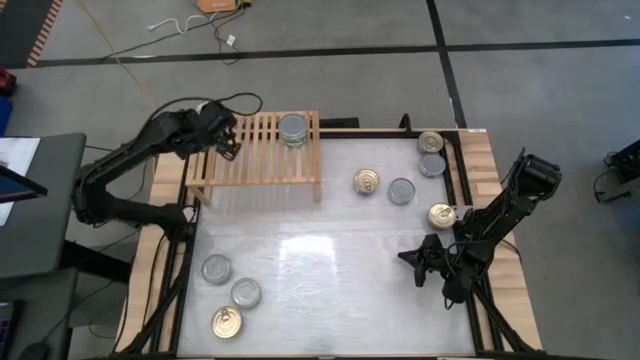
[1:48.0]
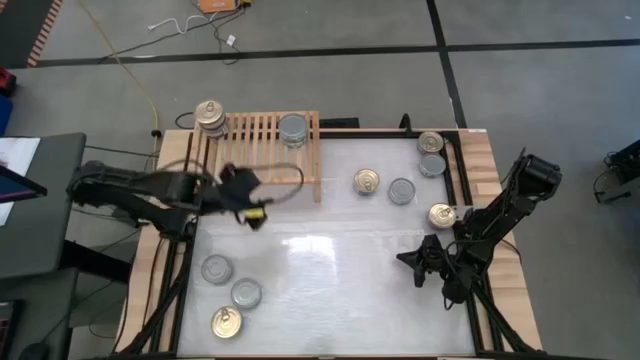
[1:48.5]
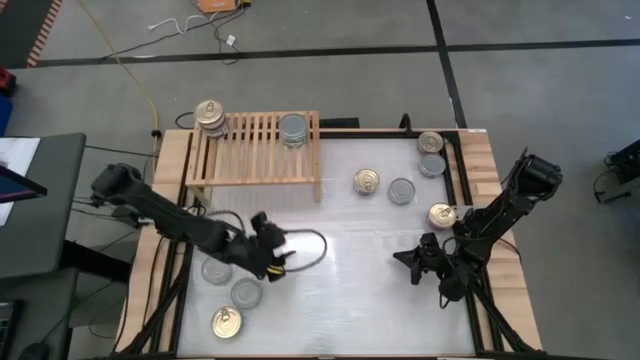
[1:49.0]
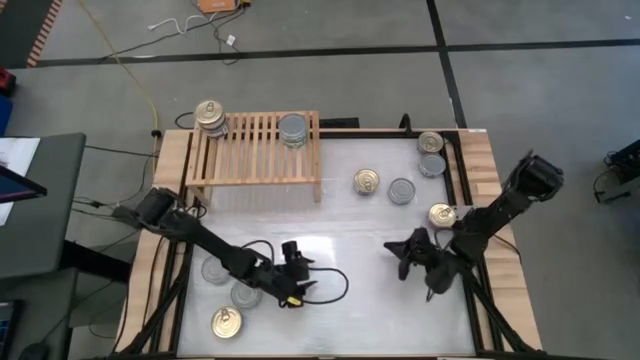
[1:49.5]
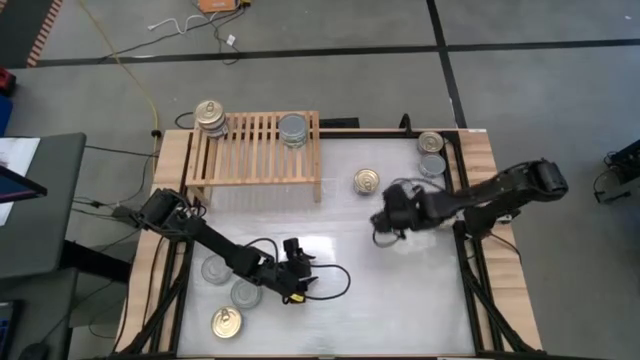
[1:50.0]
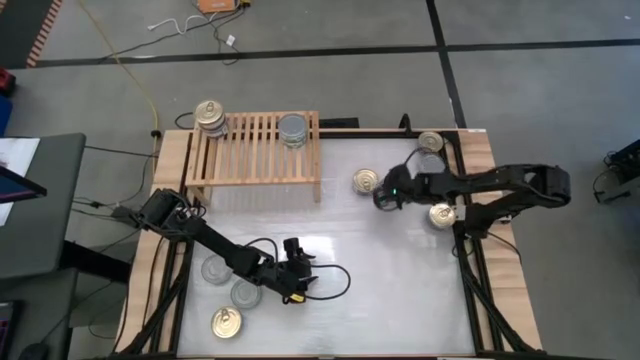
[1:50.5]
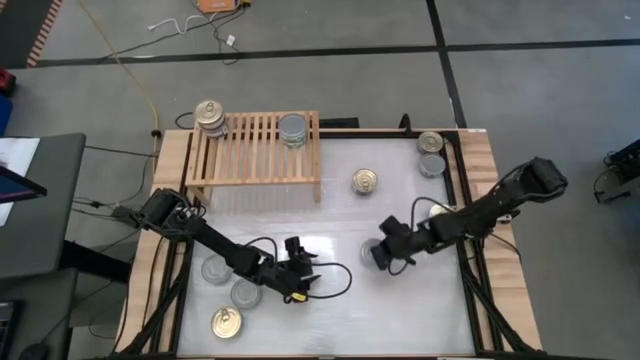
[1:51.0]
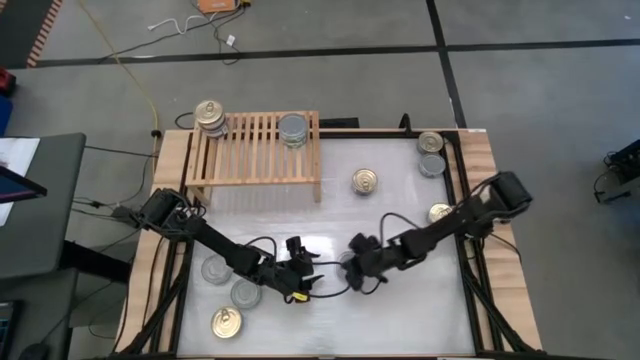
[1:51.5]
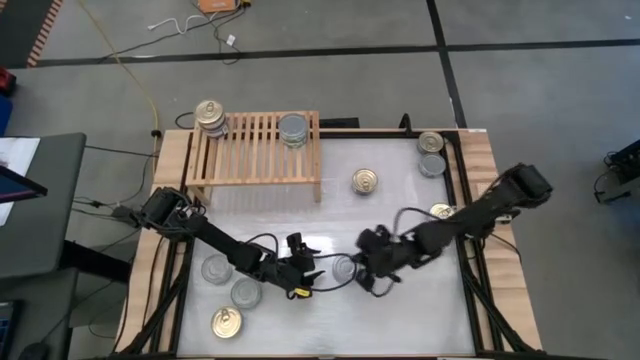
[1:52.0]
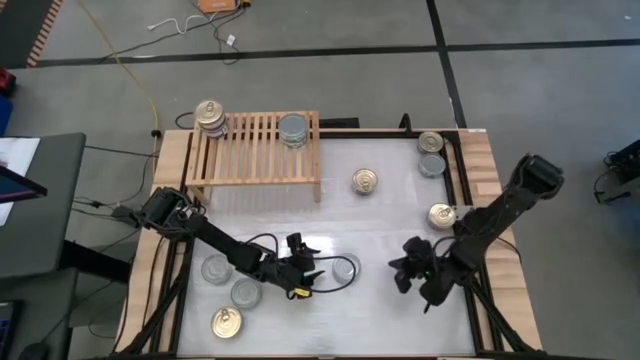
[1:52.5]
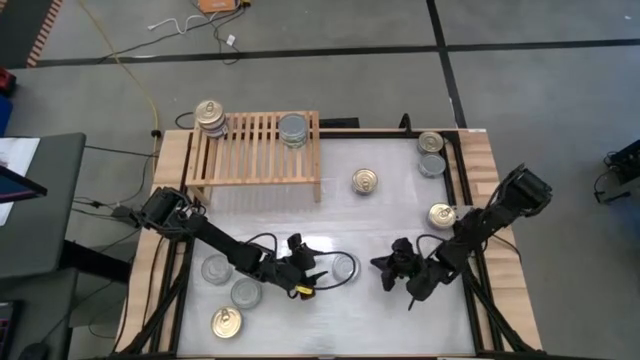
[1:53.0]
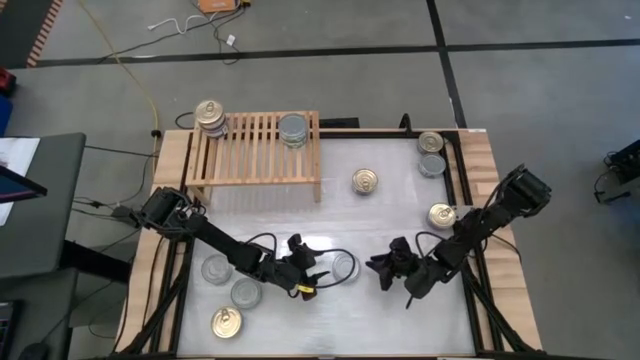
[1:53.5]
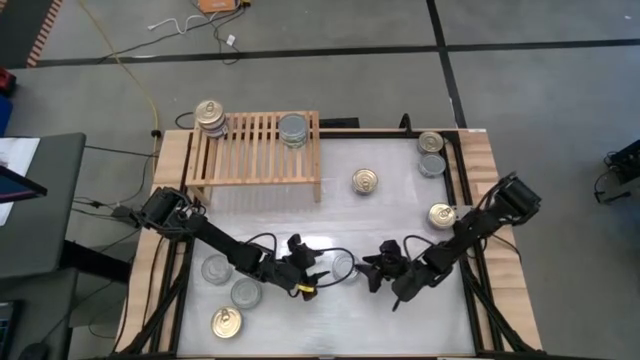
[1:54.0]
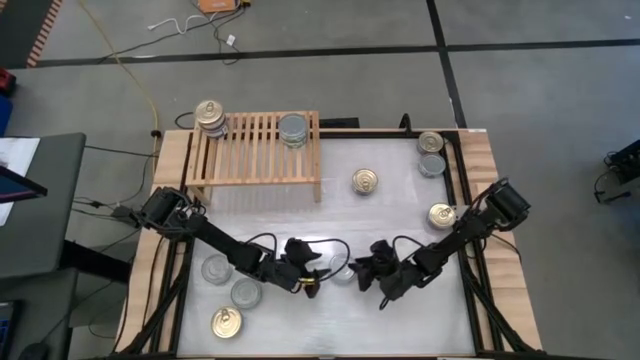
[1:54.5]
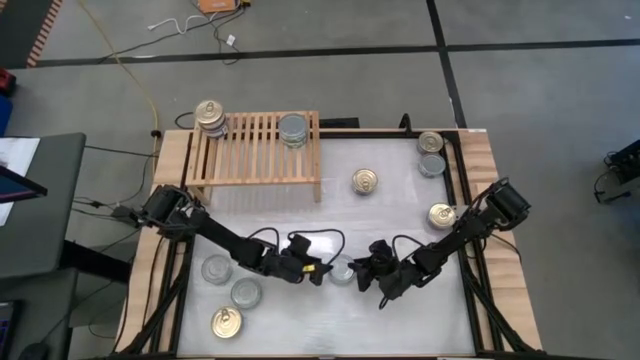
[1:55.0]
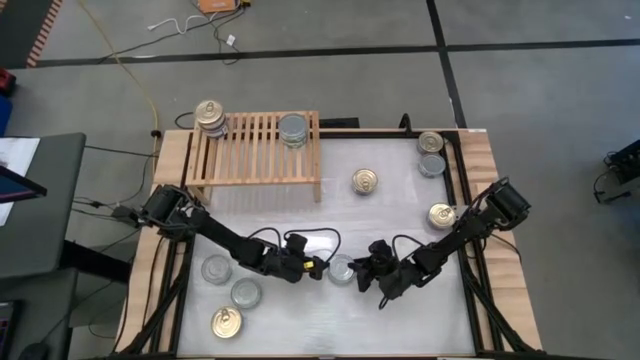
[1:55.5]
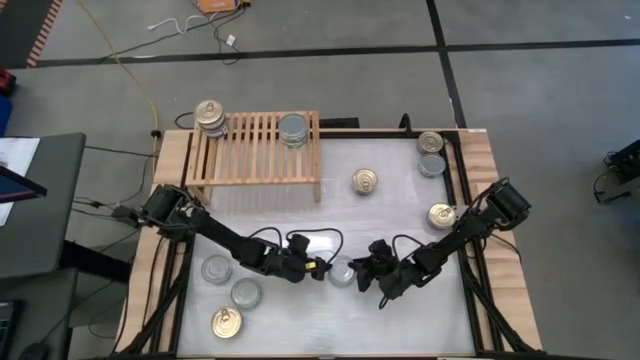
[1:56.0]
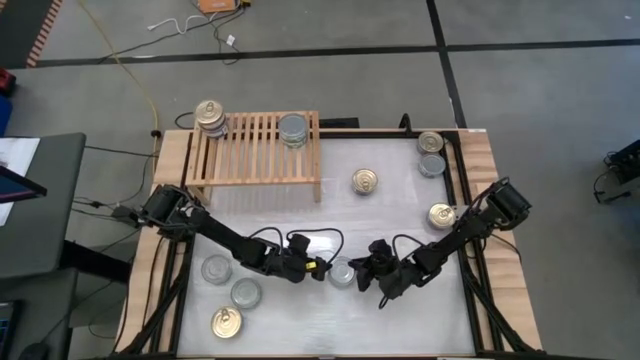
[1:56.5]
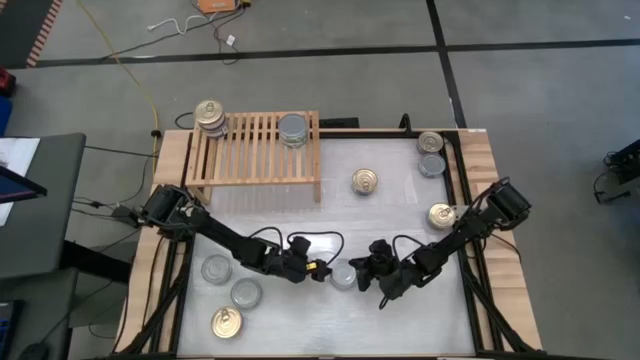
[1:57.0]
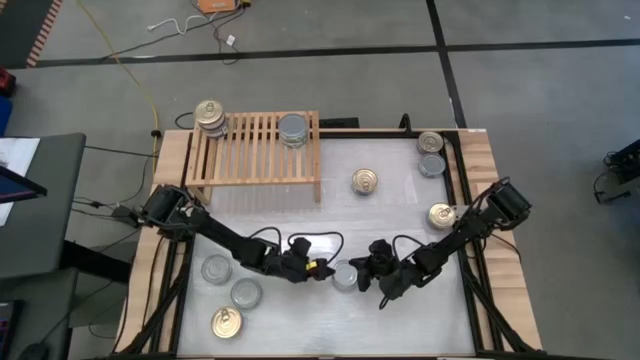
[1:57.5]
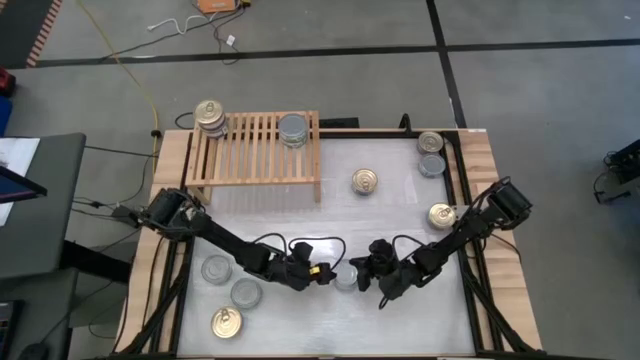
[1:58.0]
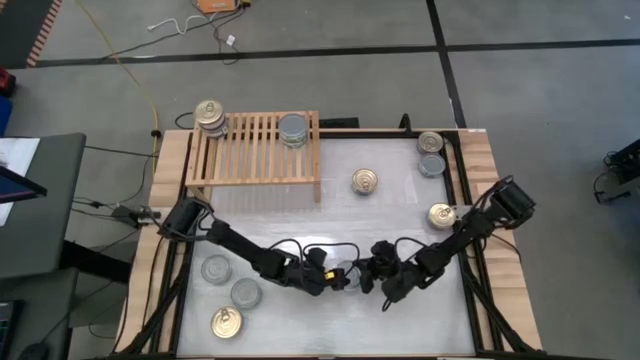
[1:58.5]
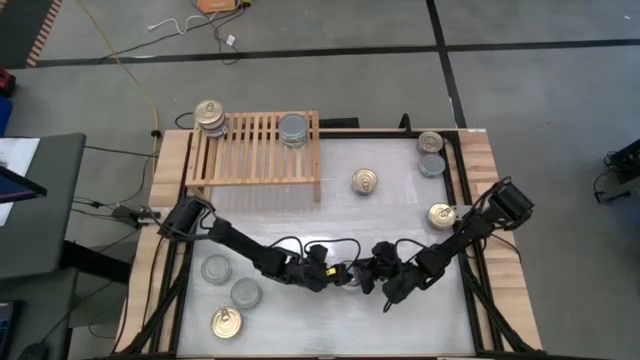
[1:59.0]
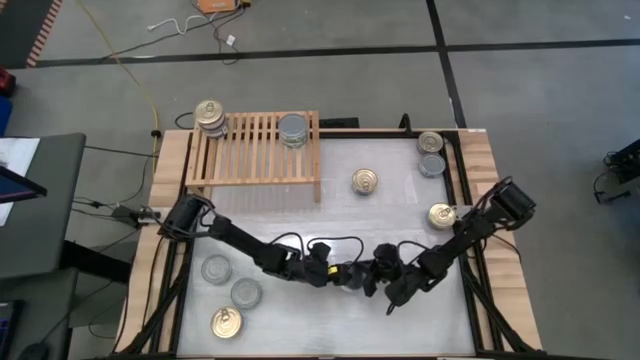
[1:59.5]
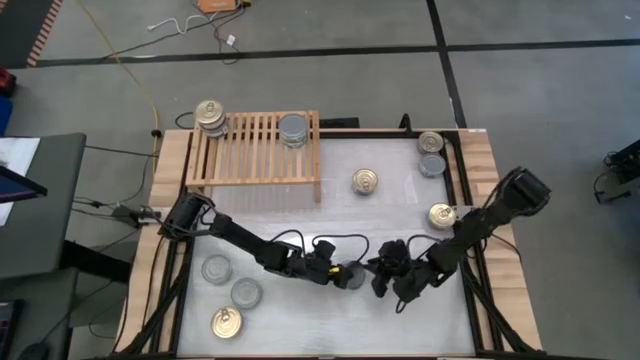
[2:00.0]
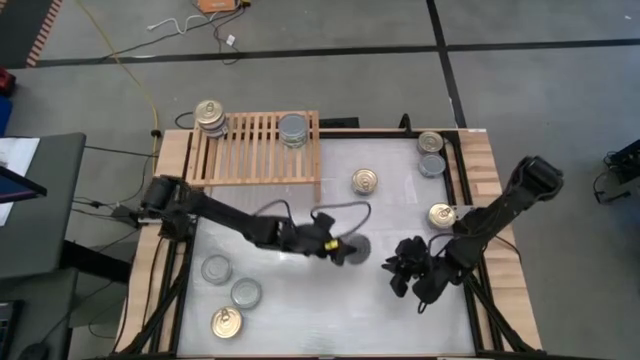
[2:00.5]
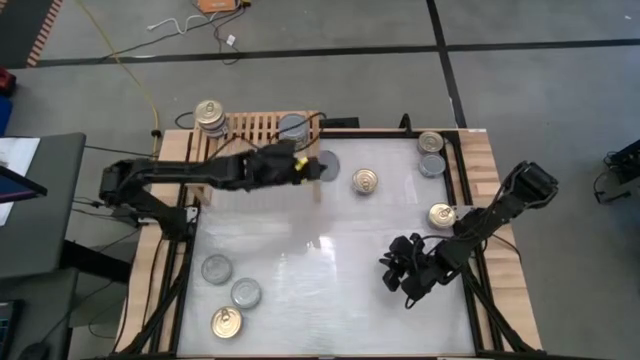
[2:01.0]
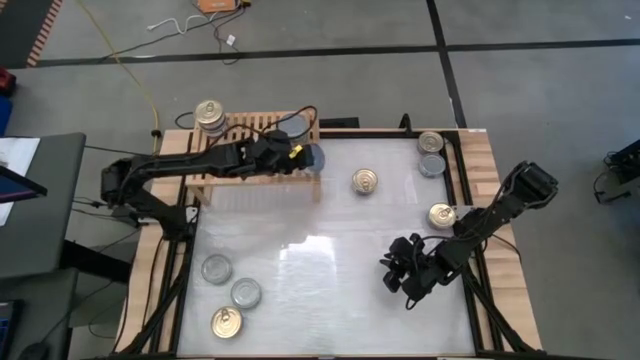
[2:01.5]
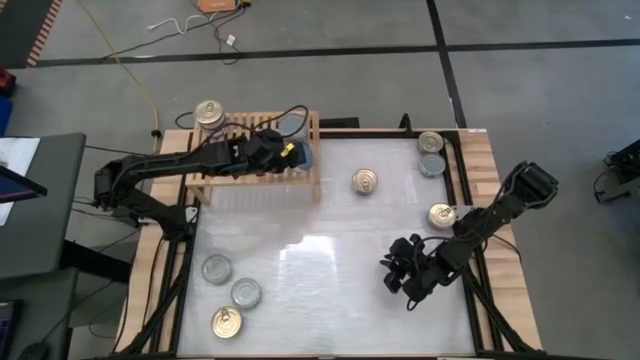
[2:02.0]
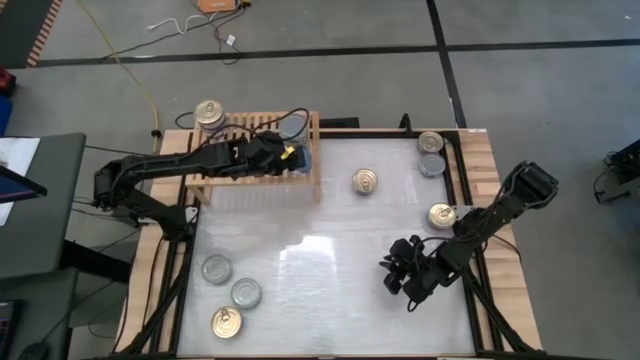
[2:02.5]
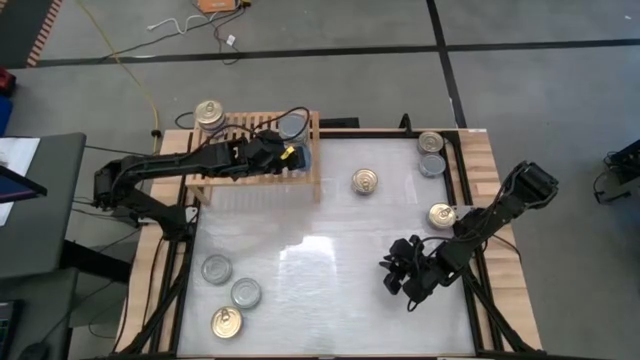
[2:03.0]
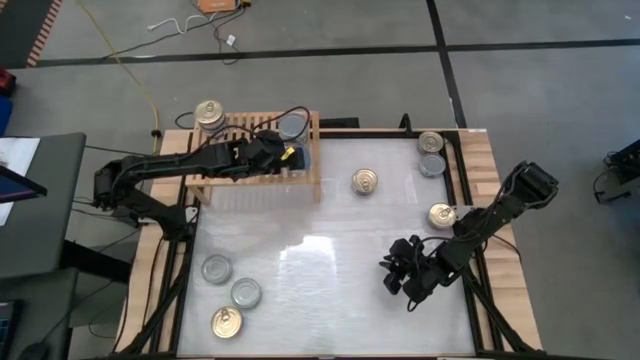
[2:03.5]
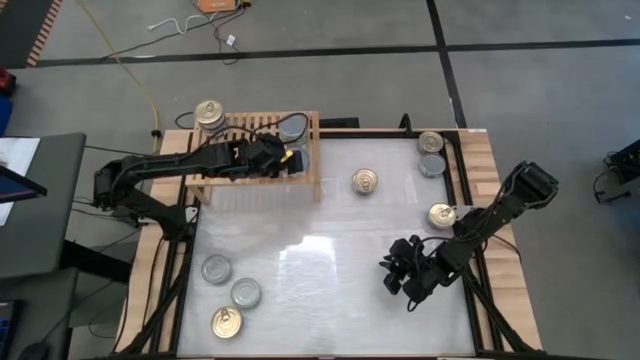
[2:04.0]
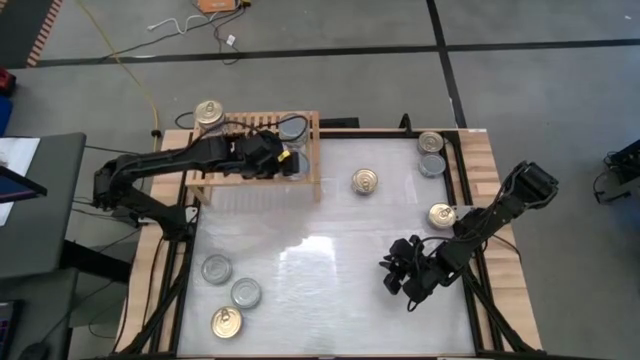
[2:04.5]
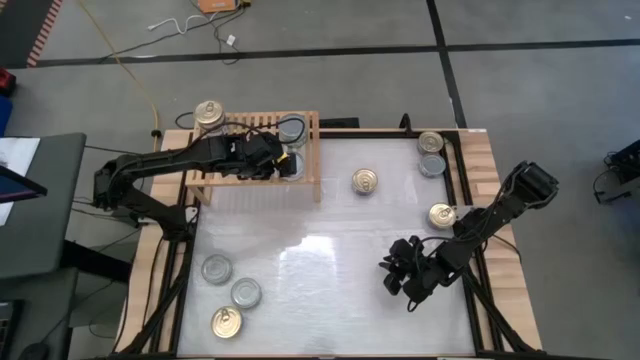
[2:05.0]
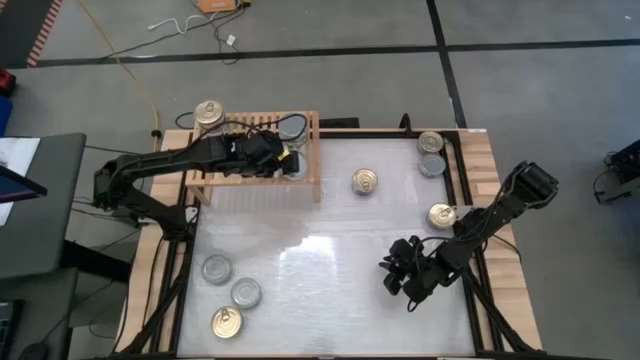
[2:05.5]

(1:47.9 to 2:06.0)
Task: Stack canned seafood by type on shelf
Put the green tuna can aligned with the other green tuna can on the shelf

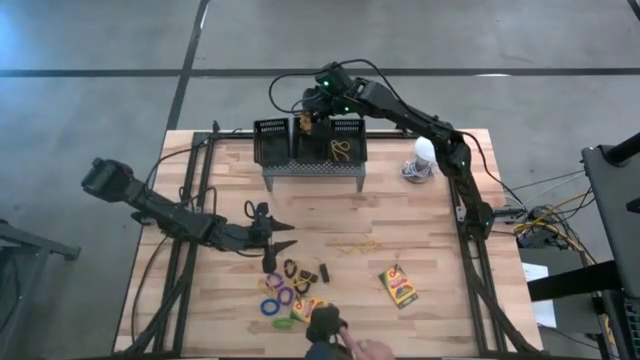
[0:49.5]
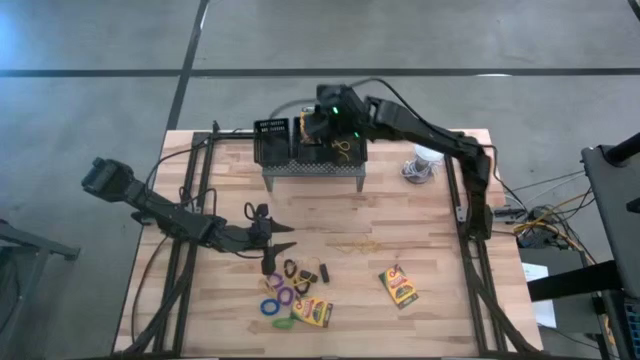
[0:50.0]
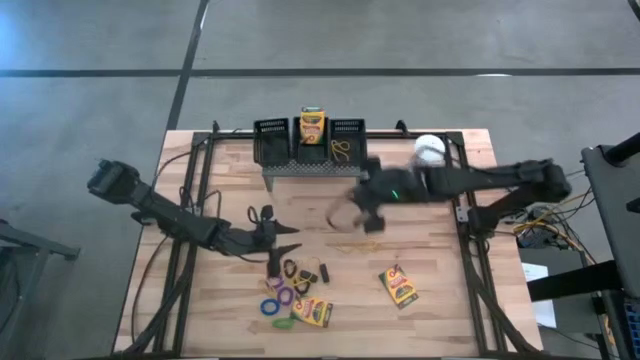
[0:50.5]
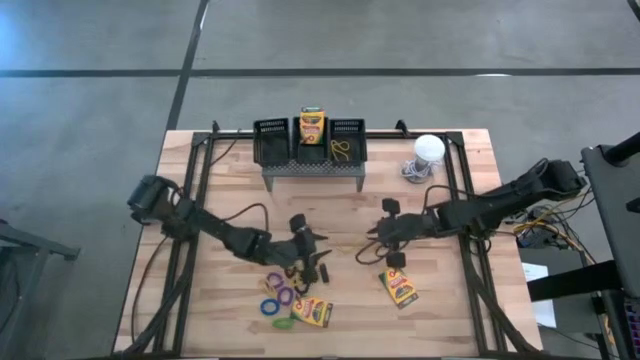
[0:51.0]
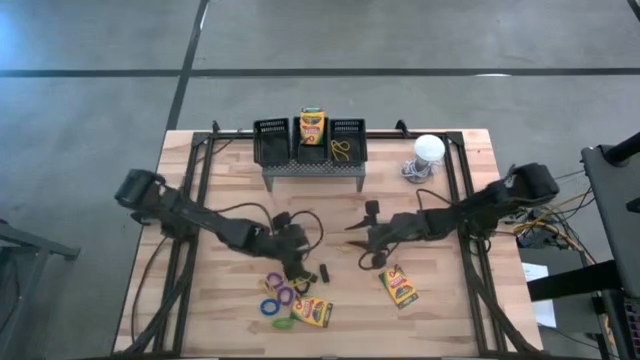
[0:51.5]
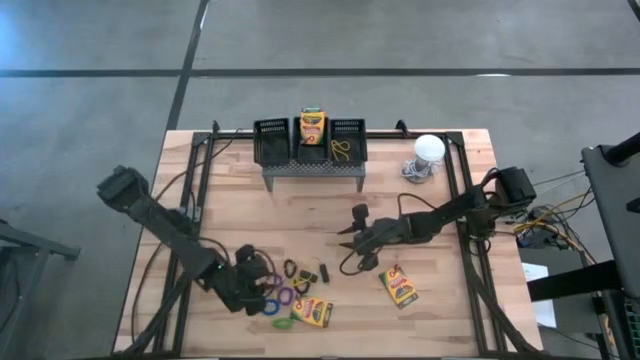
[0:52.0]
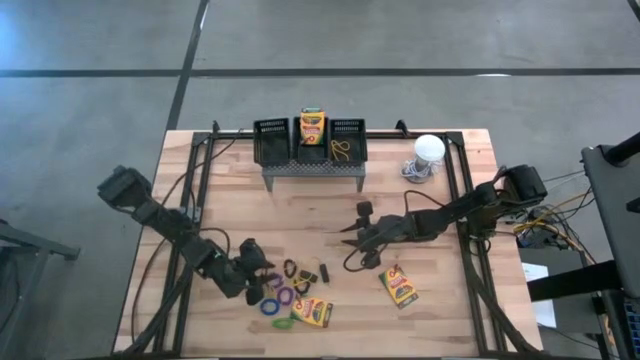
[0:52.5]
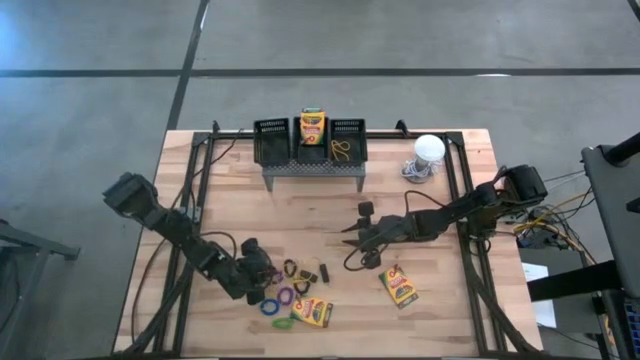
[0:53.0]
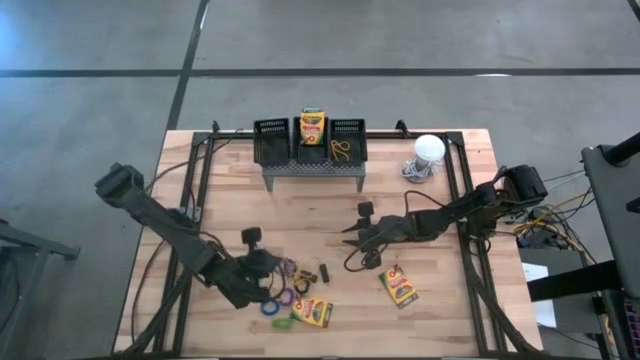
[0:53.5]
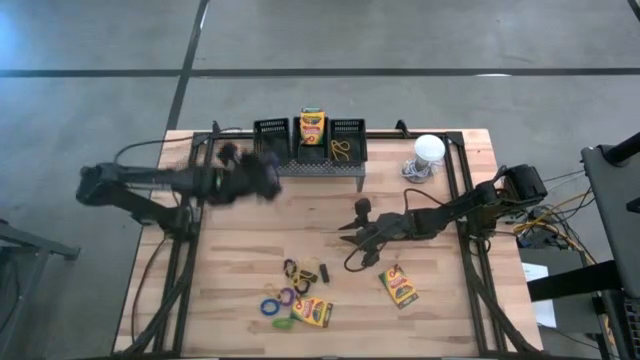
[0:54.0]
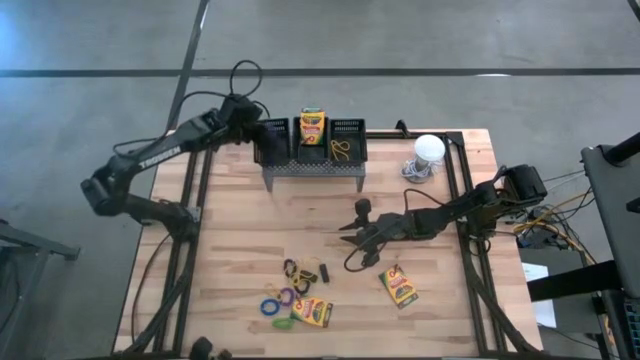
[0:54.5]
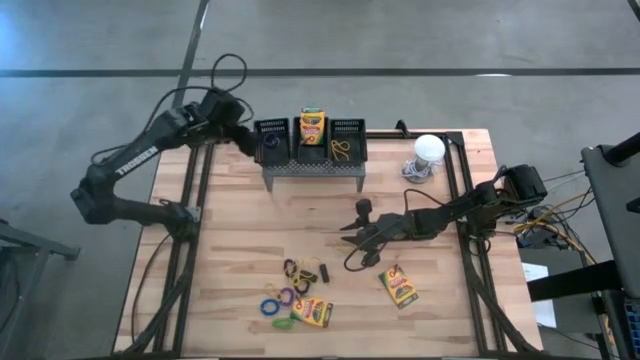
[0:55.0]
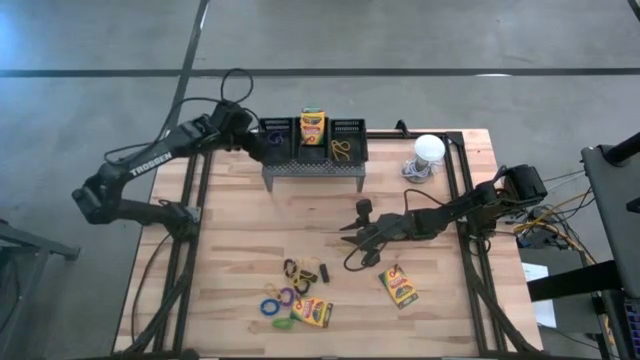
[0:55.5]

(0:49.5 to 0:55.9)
Task: Pick & Place Office Desk Supplies
Put the purple spring keychain into the left black basket on the shelf
